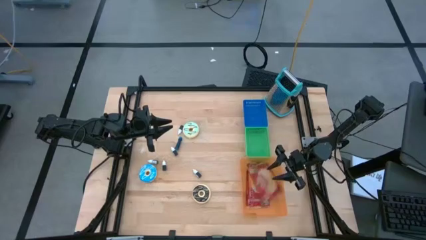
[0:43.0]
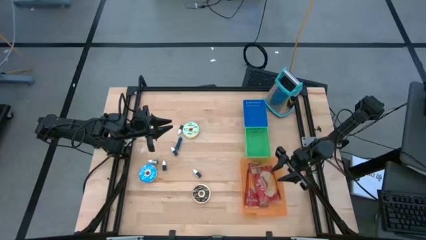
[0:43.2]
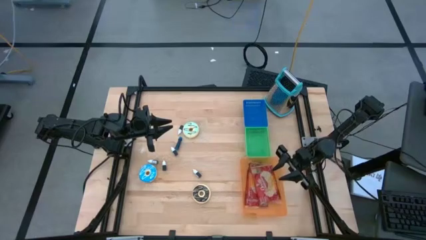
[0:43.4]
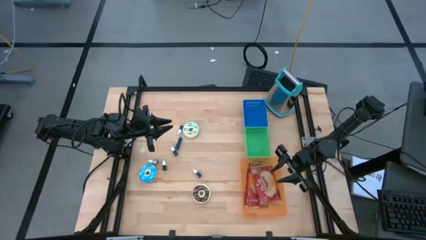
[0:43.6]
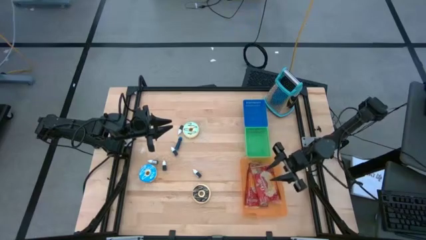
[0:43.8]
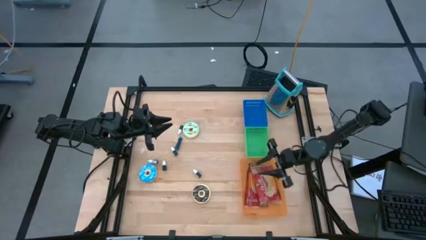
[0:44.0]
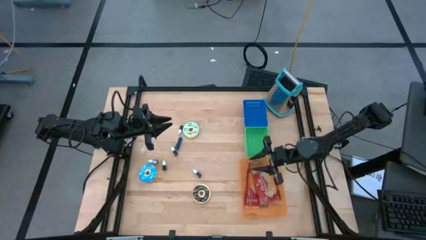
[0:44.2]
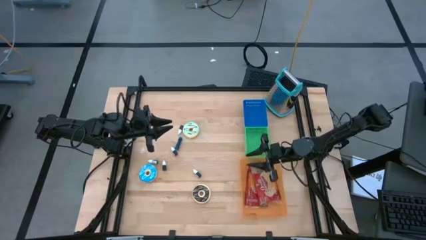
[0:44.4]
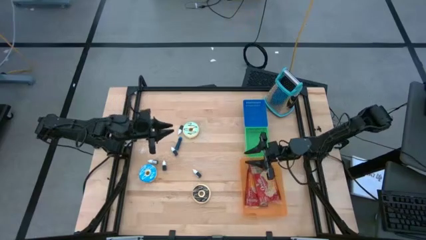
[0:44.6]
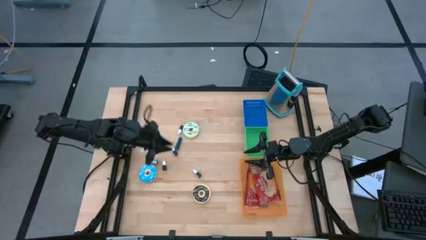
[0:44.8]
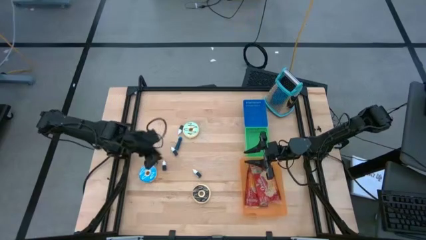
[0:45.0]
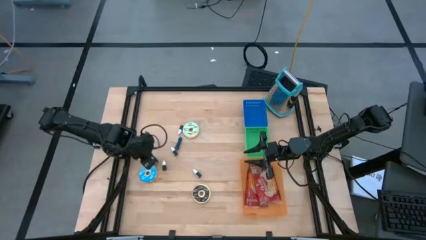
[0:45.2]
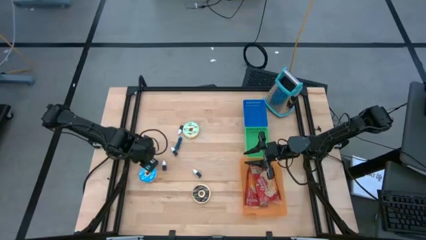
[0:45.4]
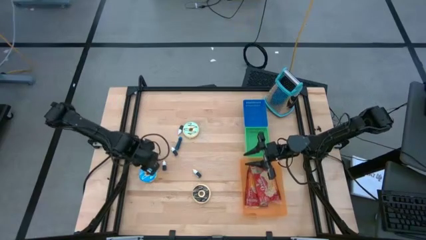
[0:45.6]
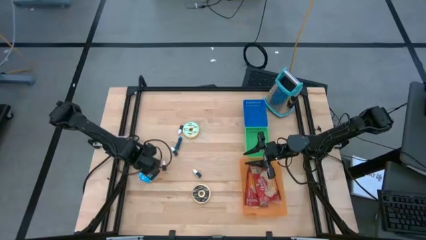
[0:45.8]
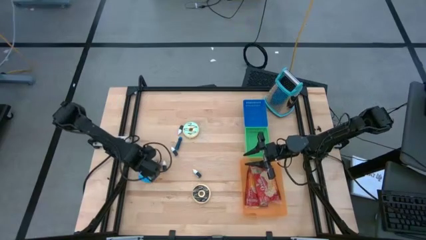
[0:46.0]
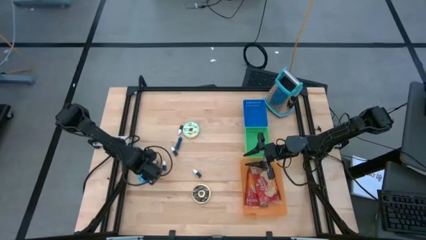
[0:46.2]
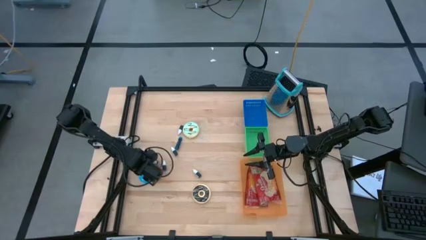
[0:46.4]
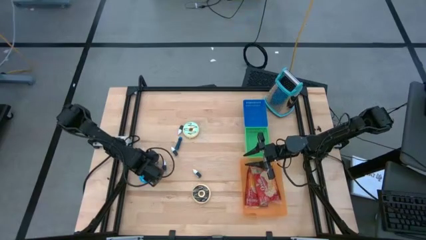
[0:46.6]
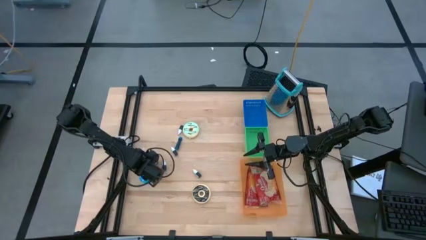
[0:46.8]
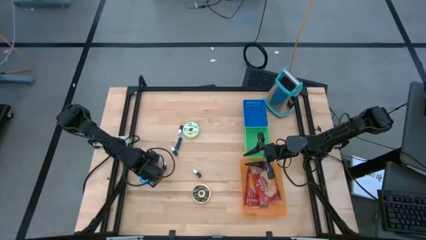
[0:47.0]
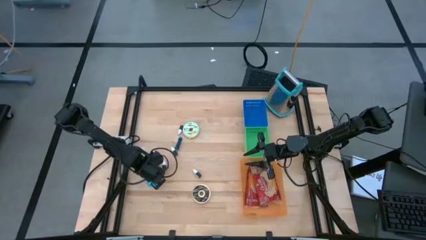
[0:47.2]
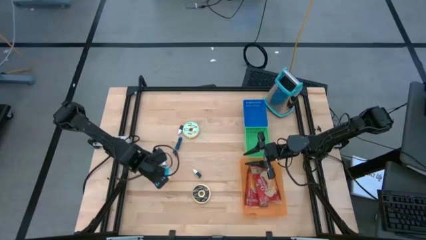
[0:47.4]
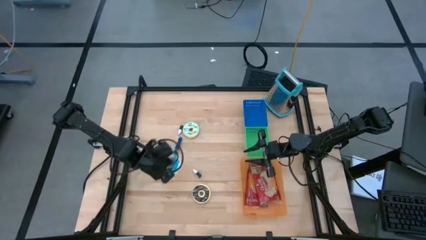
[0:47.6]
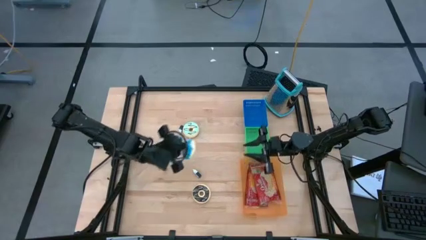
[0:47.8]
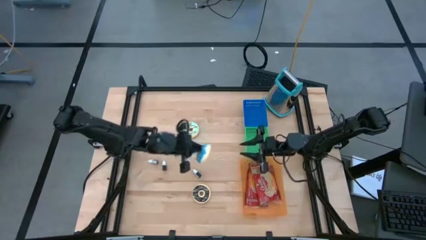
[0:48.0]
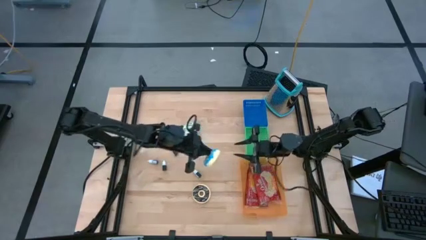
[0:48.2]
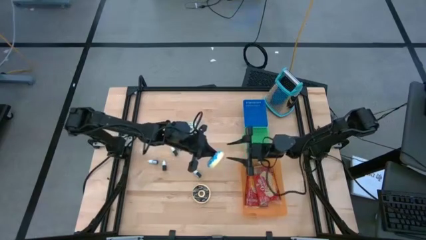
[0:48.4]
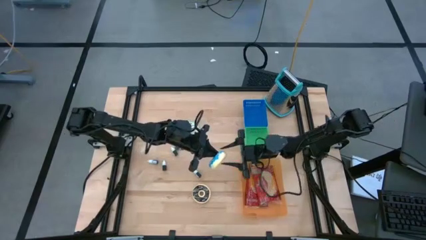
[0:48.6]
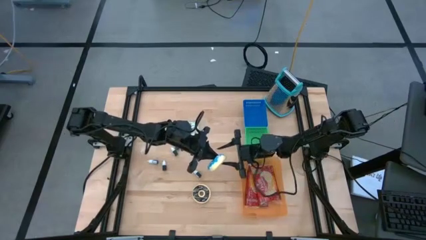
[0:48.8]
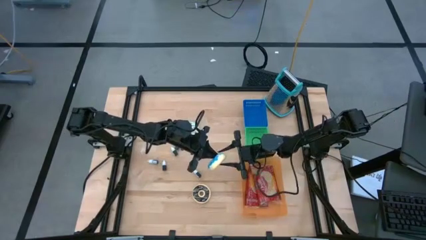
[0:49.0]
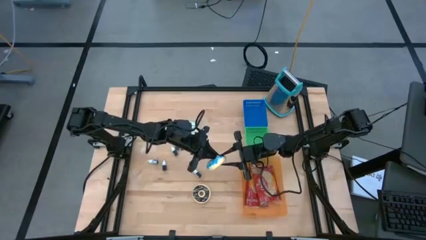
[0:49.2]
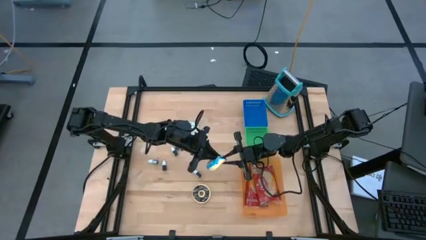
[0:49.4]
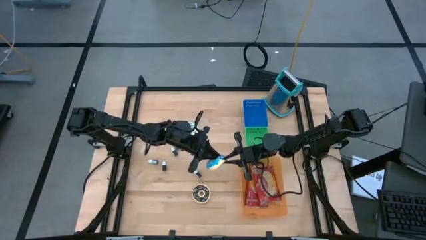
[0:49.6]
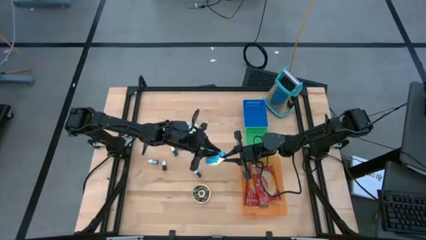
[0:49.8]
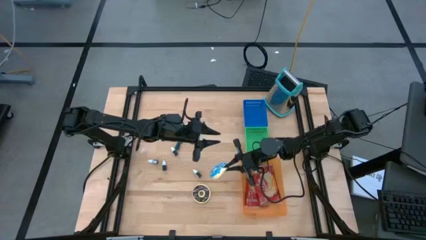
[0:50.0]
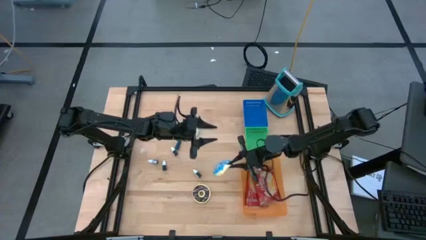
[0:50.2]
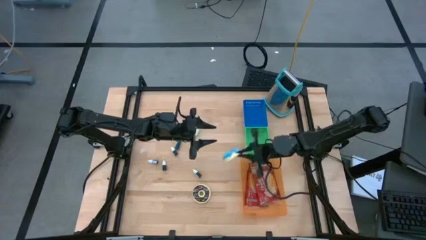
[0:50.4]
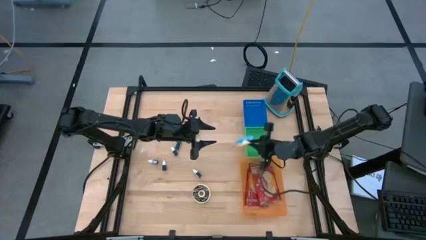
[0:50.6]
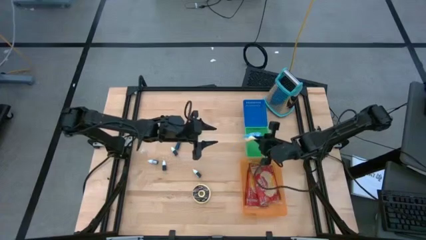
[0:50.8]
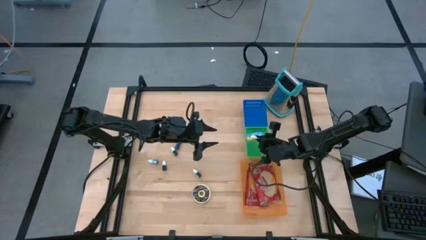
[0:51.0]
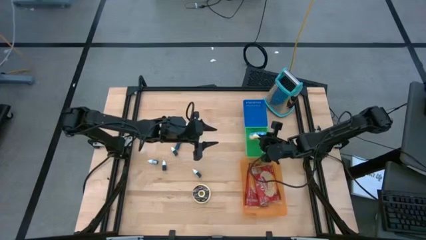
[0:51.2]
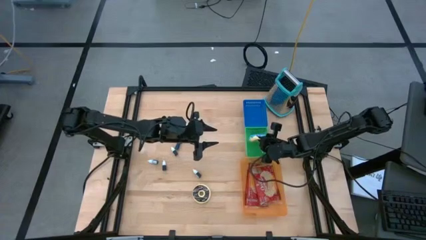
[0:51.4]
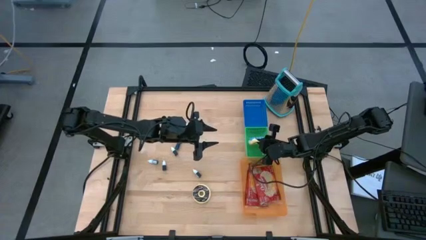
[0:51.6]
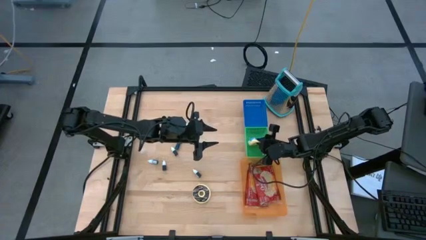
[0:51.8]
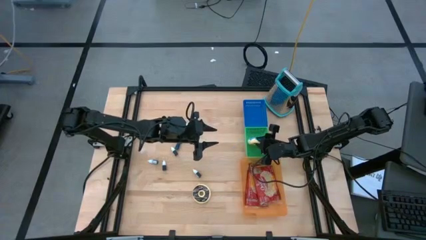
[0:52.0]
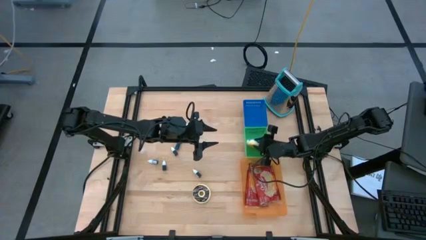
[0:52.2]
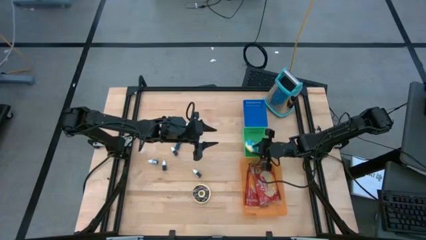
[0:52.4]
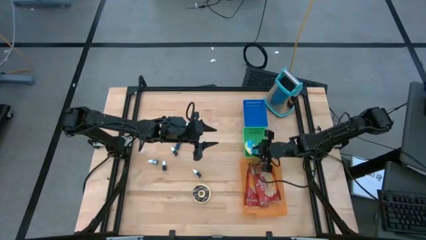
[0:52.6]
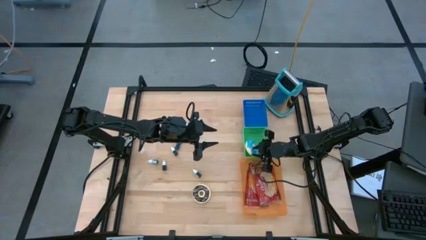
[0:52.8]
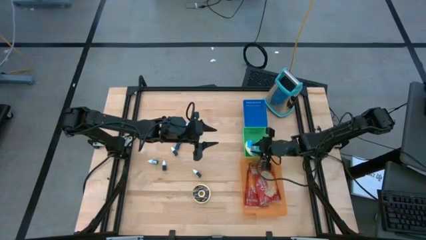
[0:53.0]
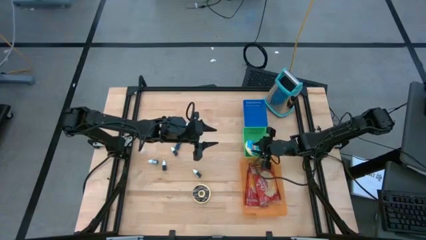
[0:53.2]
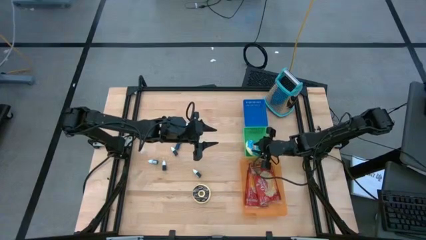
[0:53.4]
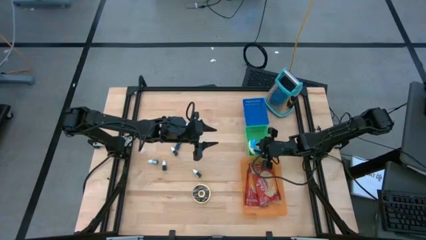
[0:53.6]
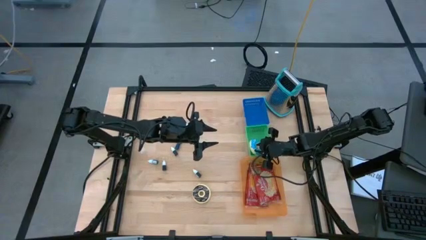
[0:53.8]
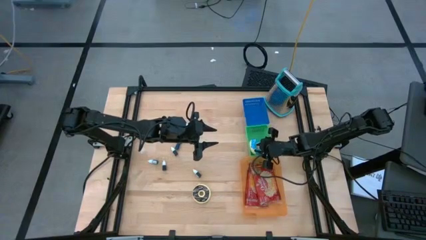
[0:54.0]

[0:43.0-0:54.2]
Put the blue donut into the green bin

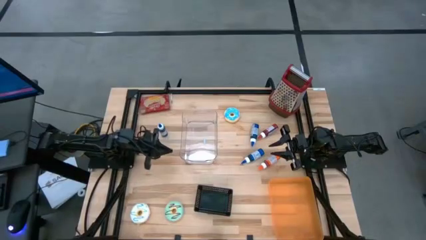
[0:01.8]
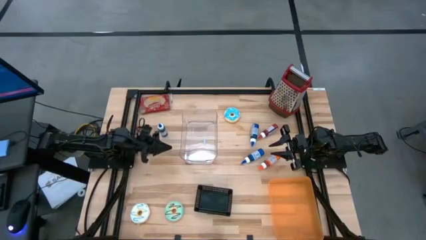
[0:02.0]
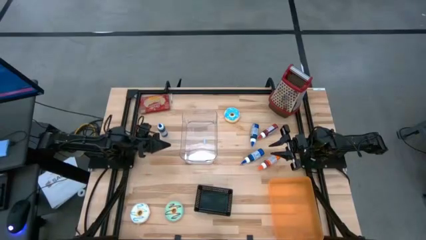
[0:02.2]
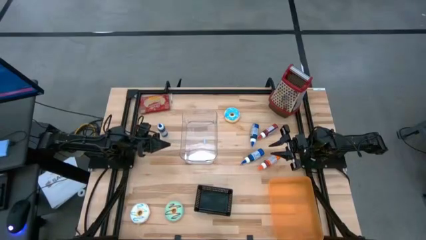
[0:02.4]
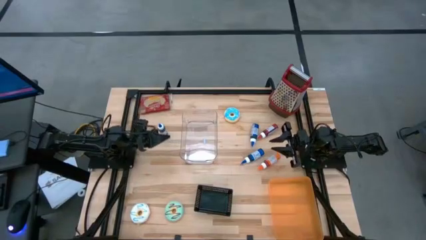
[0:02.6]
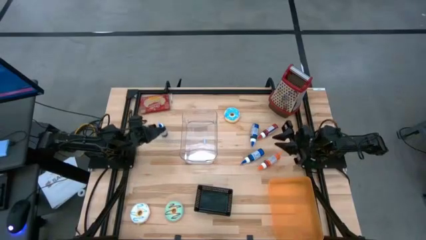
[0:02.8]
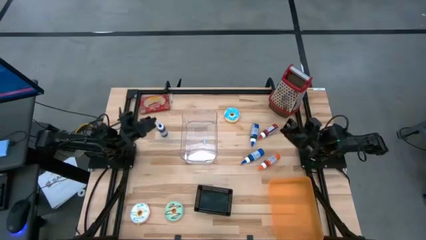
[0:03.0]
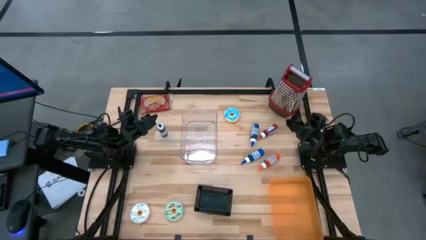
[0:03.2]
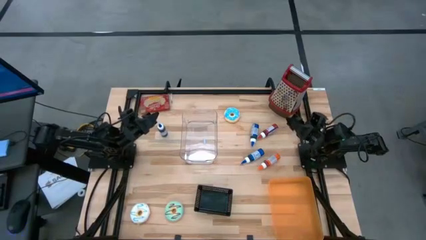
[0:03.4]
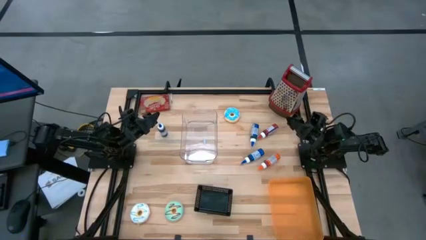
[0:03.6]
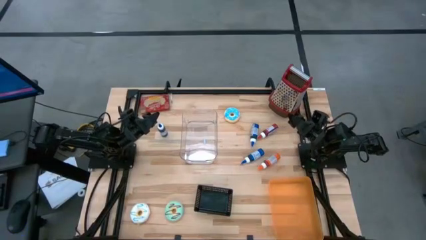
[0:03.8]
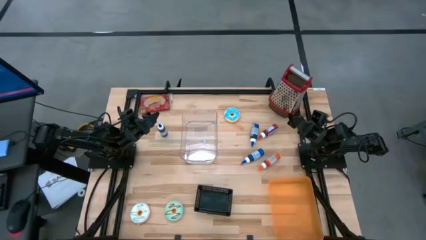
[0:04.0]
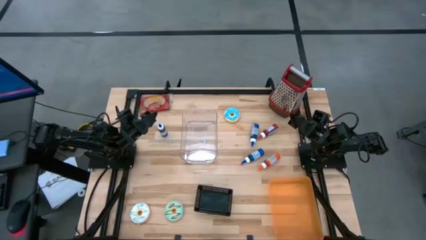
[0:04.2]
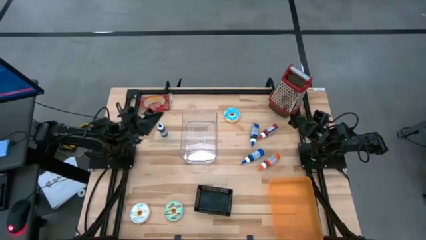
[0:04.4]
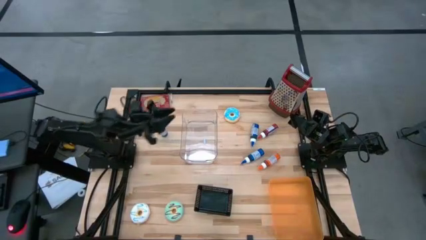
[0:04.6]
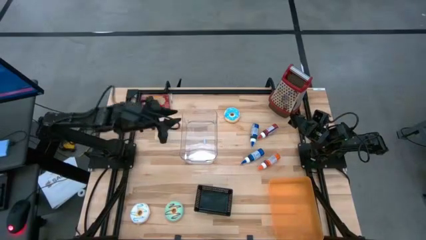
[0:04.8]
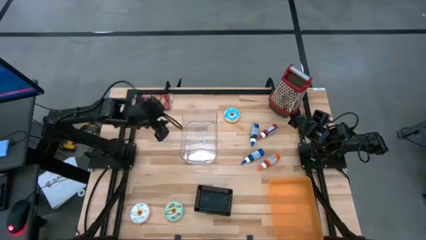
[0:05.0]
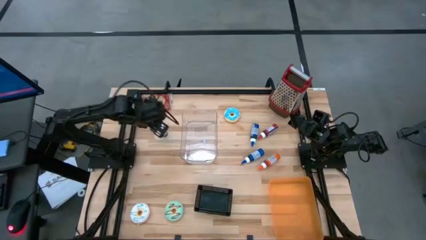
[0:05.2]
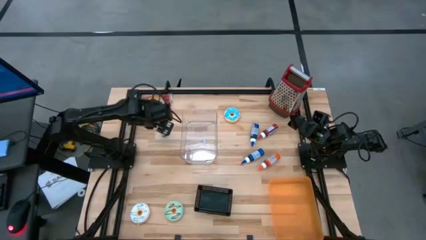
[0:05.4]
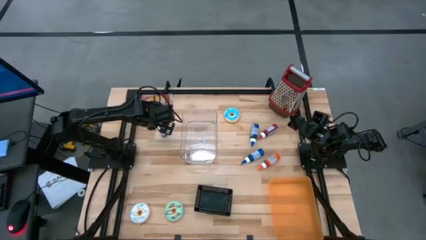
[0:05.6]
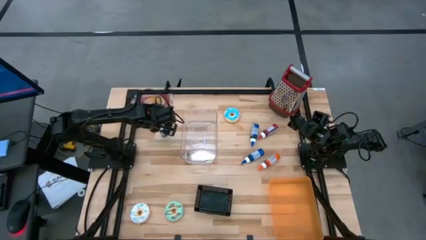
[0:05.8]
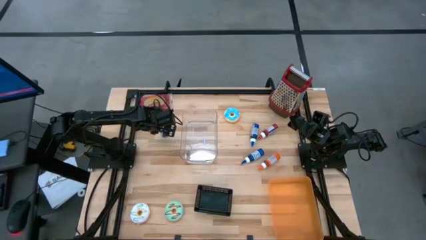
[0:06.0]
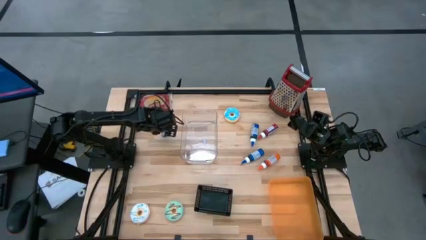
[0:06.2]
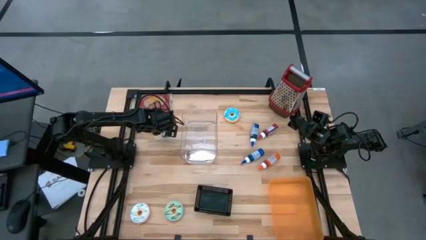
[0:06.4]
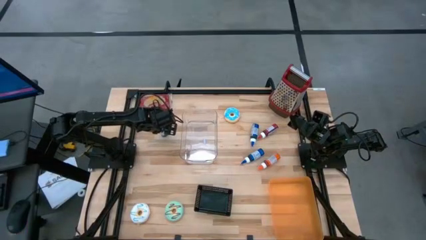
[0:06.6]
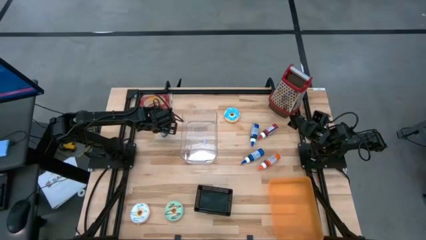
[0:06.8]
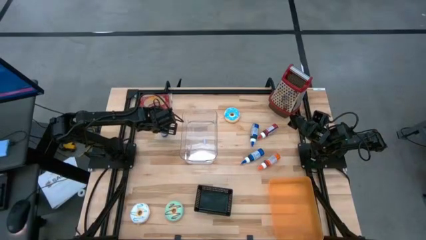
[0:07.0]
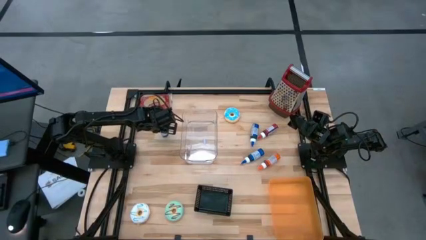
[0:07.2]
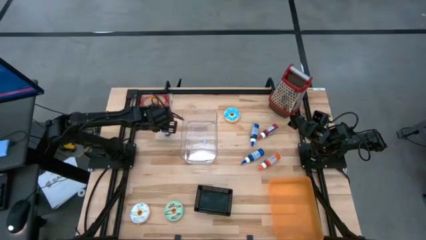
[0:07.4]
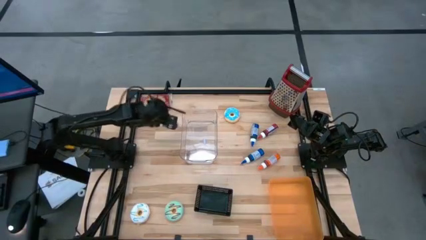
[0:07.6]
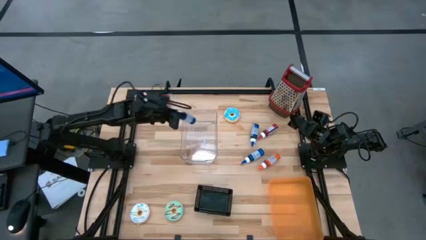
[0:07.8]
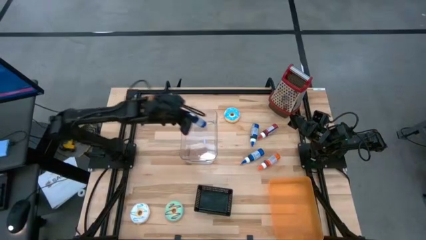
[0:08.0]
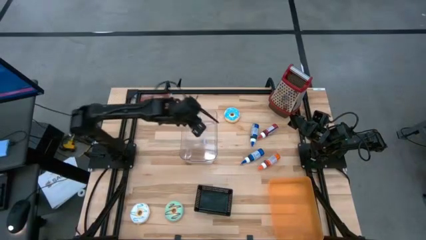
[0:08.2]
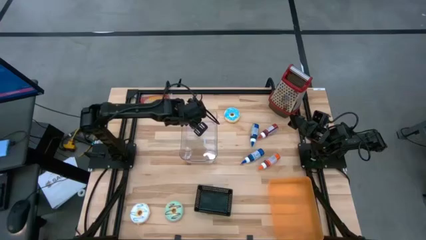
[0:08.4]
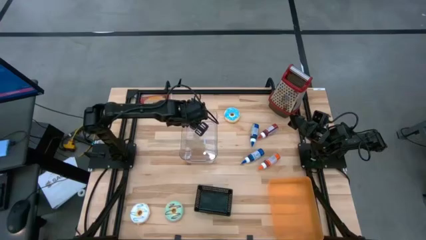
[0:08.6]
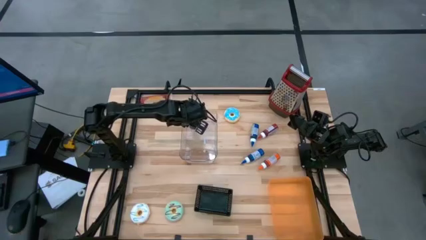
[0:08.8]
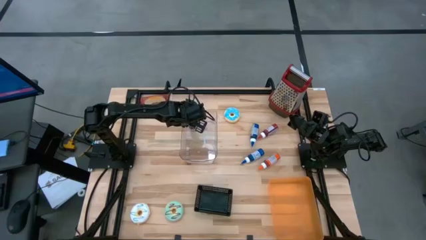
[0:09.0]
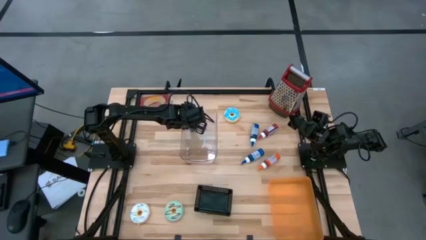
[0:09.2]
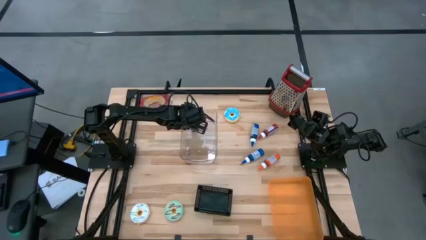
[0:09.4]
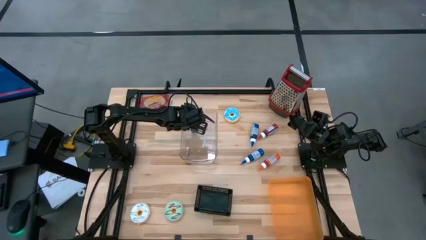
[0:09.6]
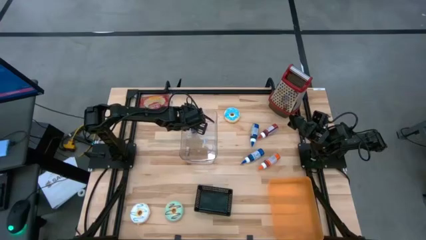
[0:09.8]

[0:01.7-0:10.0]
Put the left blue food coloring bottle into the transparent bin
